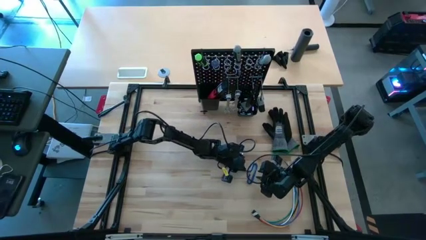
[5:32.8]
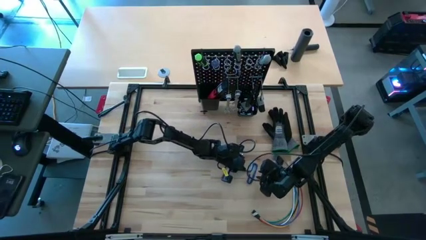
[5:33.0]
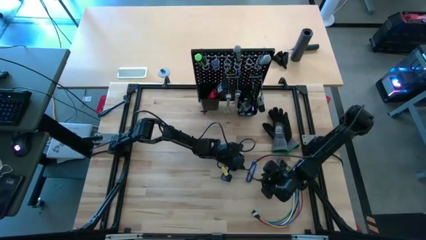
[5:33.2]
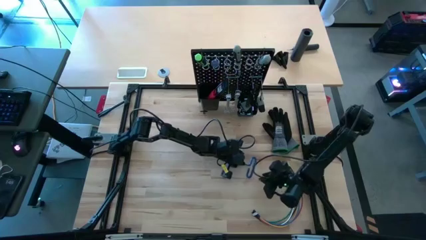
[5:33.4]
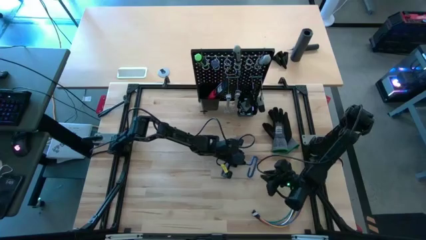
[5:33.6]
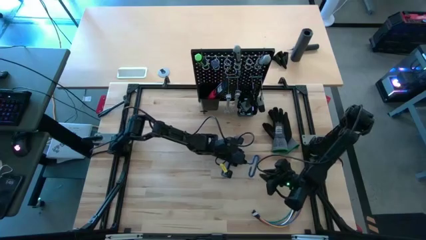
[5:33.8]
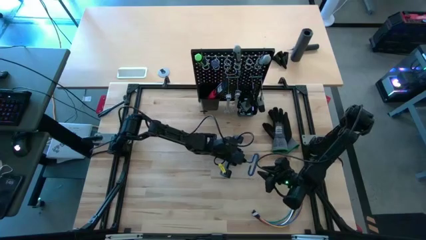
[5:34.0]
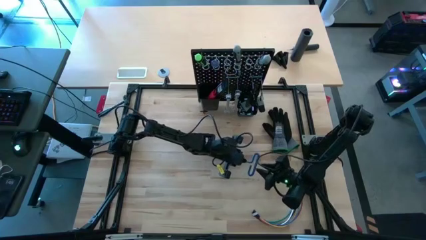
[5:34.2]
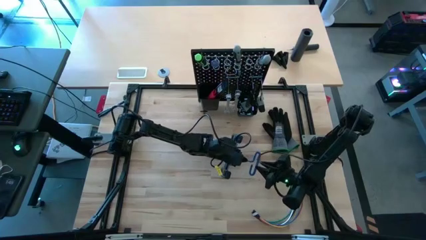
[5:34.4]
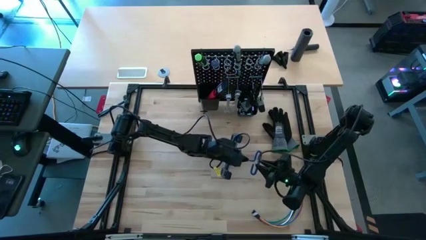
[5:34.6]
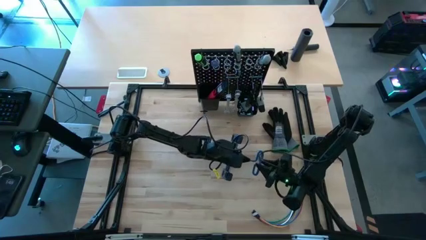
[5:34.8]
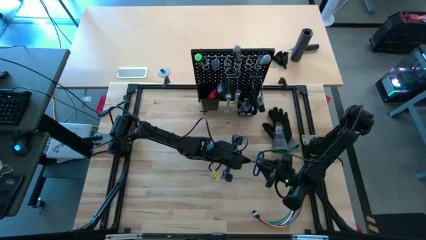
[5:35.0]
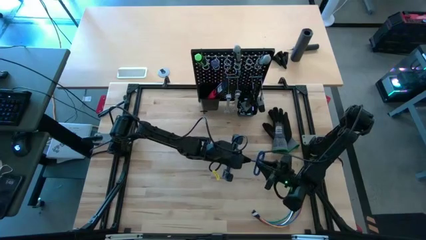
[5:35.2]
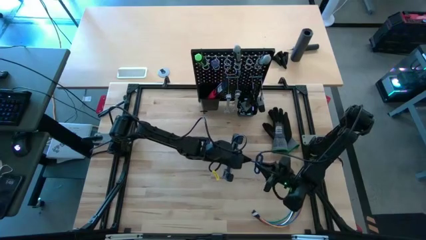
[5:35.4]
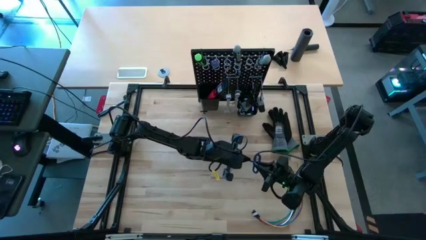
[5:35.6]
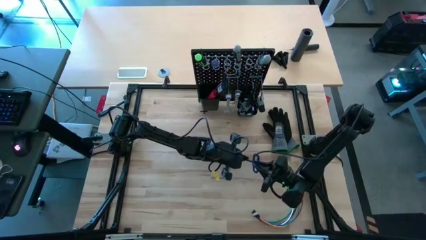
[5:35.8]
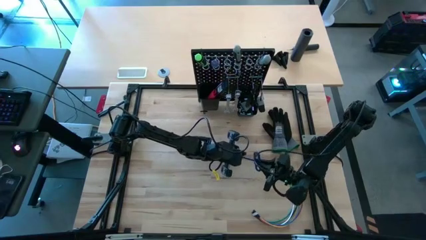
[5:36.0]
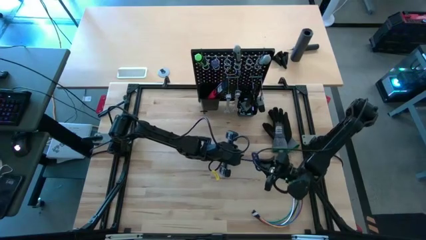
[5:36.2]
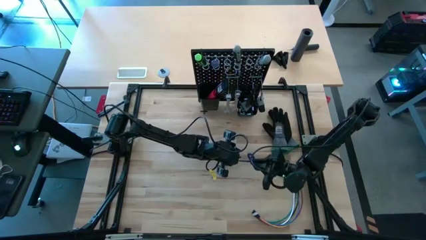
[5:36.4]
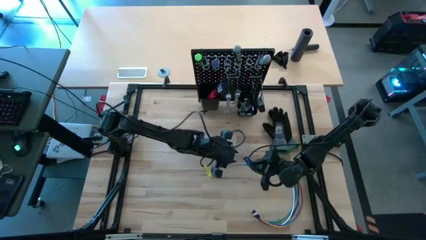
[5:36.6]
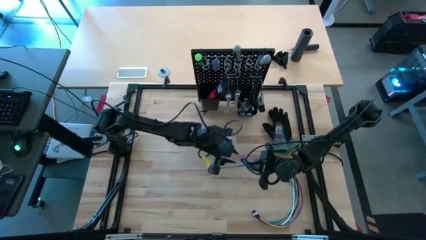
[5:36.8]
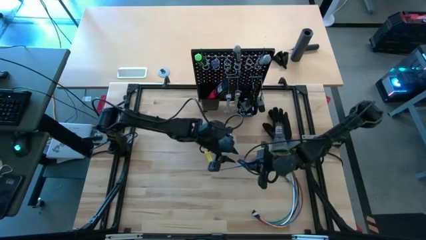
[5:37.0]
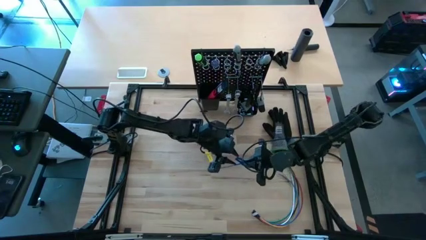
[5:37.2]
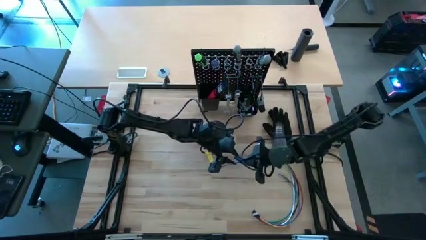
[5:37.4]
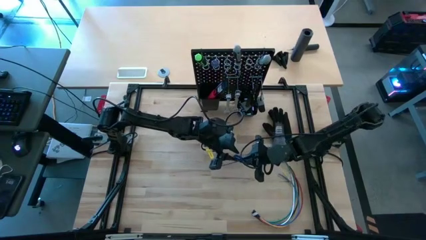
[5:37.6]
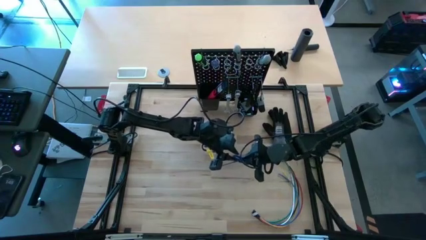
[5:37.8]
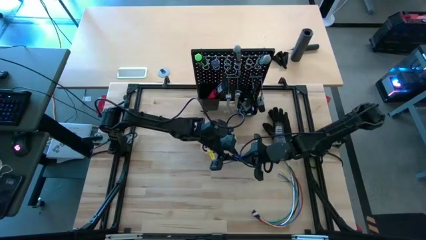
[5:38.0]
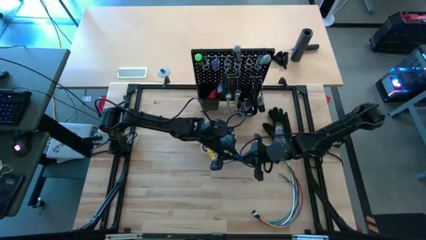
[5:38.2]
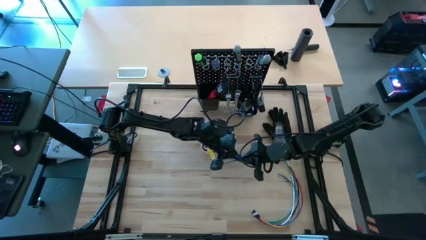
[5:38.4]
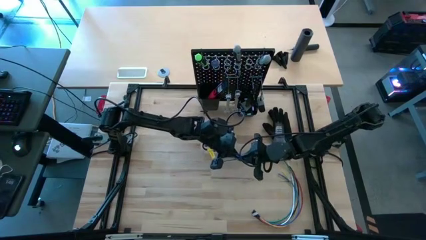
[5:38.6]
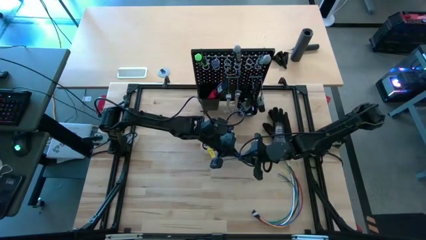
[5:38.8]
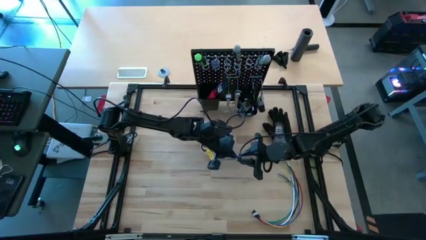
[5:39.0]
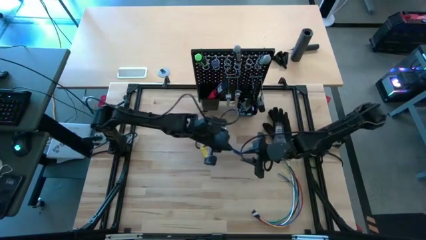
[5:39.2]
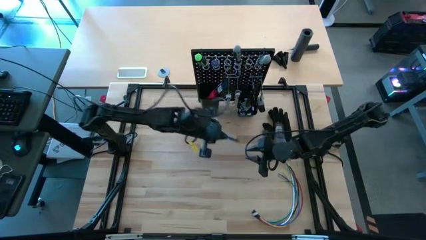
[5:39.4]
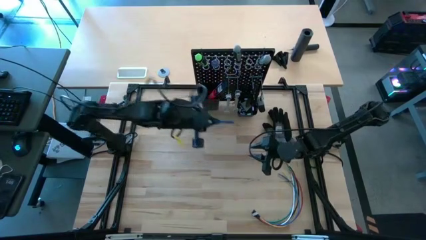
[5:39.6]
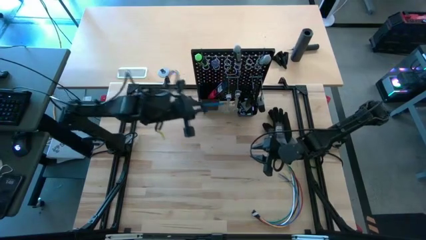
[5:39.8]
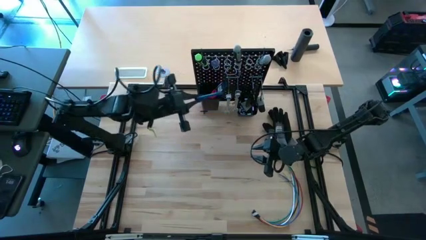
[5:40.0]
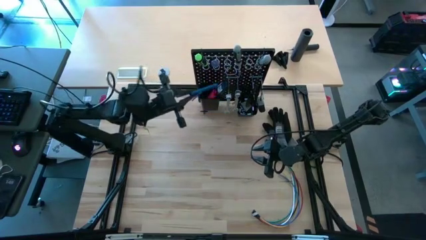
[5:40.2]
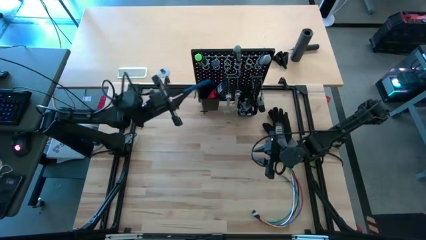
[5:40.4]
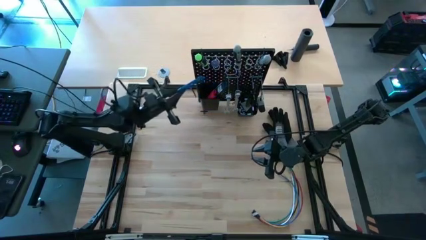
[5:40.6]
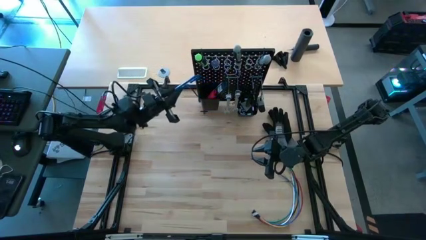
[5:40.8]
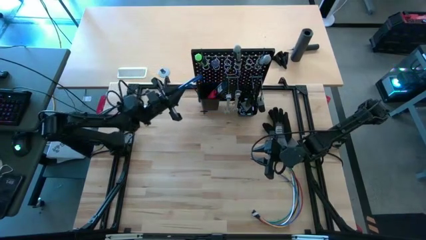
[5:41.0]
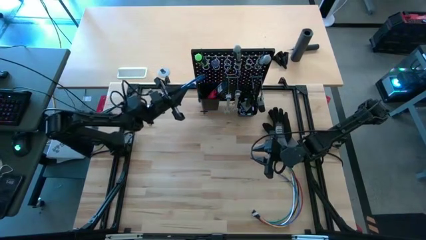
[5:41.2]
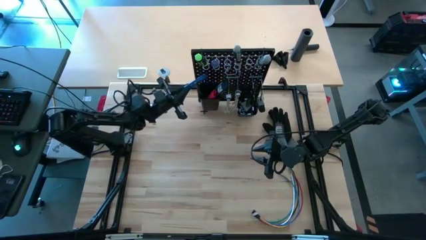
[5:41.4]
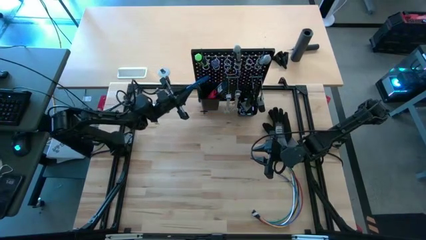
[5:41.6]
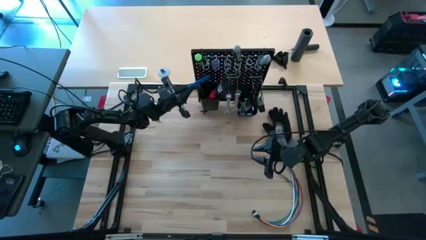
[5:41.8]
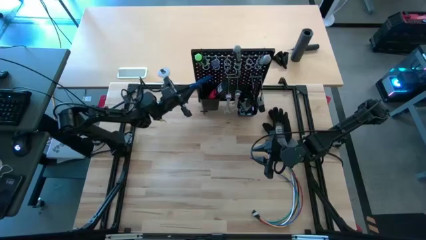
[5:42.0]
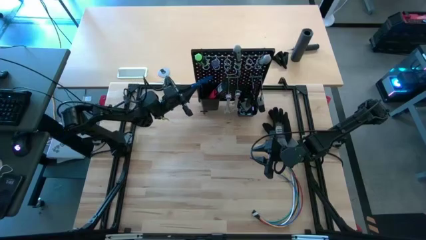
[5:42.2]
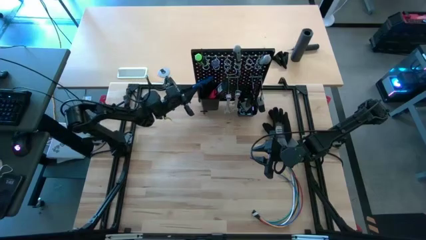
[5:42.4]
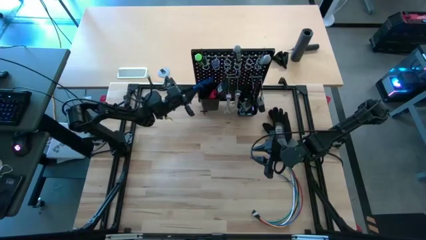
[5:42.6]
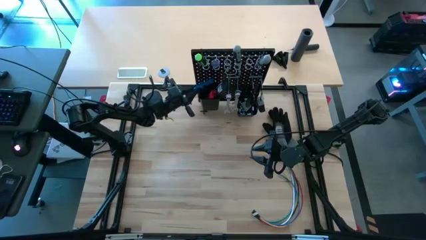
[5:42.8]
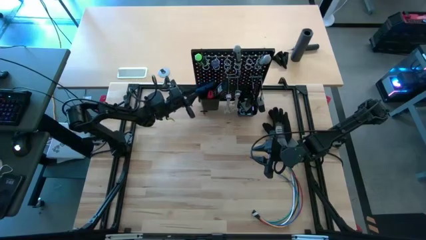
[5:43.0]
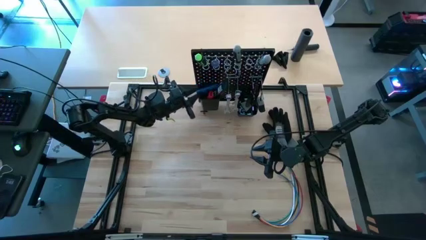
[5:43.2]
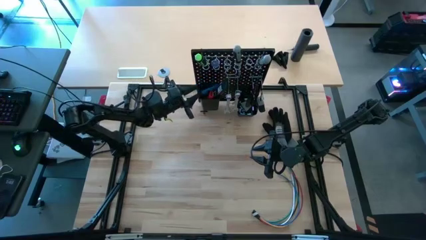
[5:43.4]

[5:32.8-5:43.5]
Task: Hang tools onto peg board
Put the blue pick tool on the left black bin on the peg board
